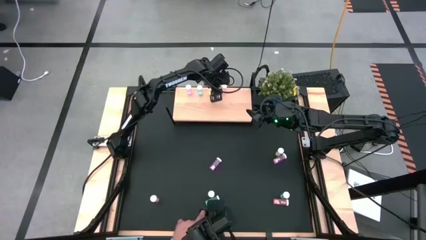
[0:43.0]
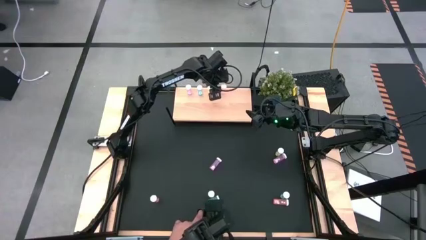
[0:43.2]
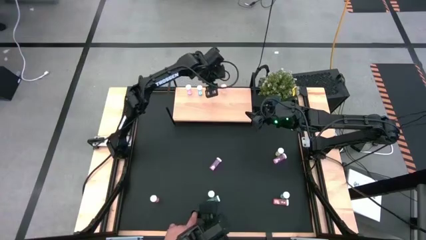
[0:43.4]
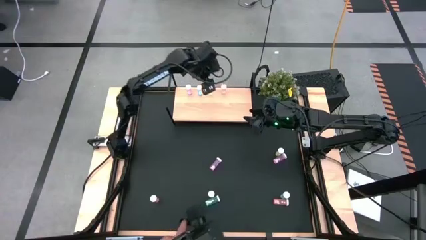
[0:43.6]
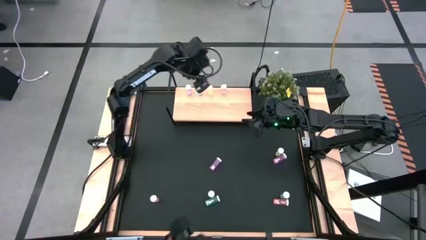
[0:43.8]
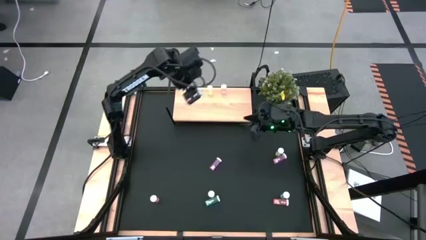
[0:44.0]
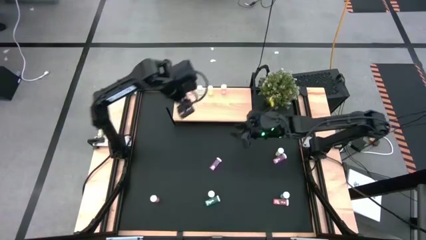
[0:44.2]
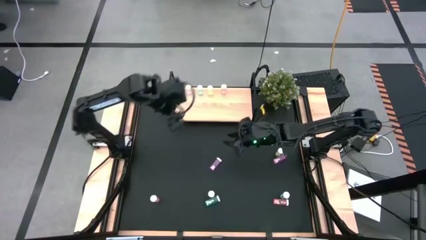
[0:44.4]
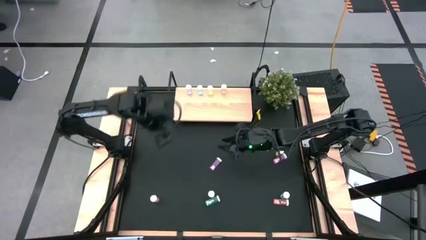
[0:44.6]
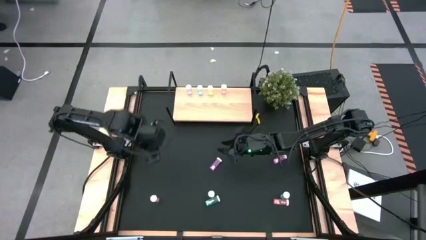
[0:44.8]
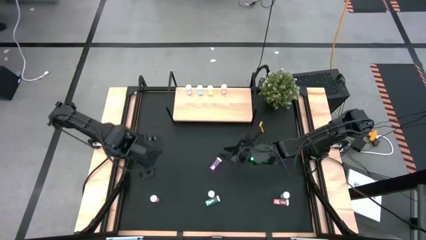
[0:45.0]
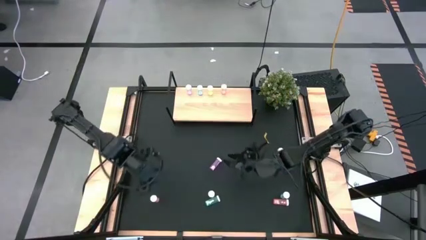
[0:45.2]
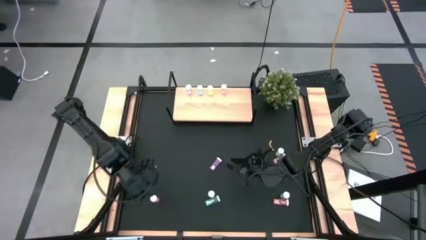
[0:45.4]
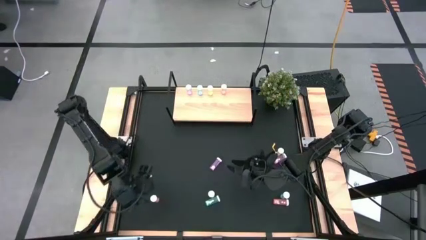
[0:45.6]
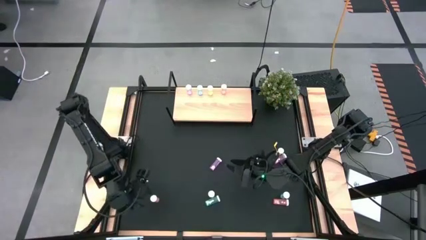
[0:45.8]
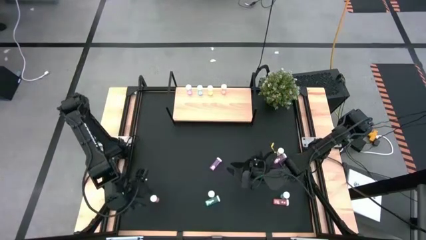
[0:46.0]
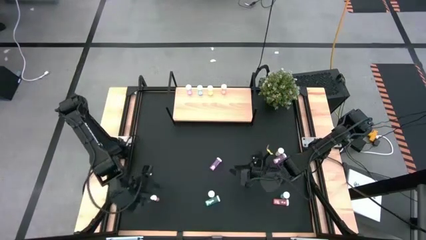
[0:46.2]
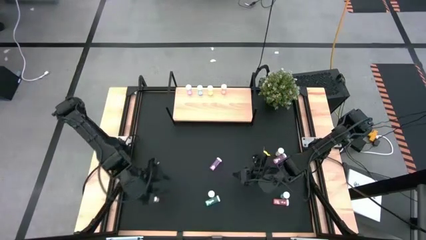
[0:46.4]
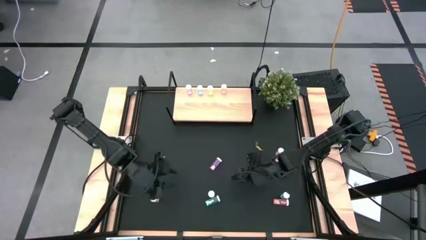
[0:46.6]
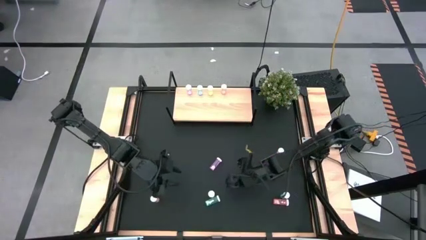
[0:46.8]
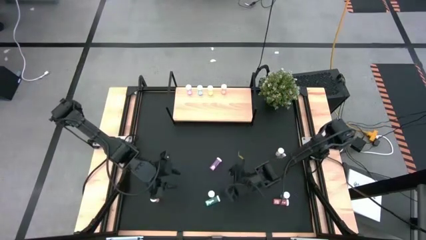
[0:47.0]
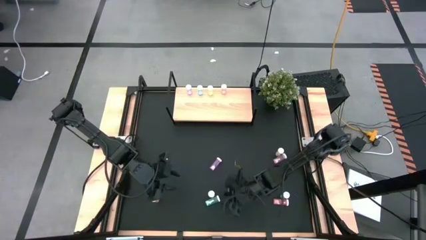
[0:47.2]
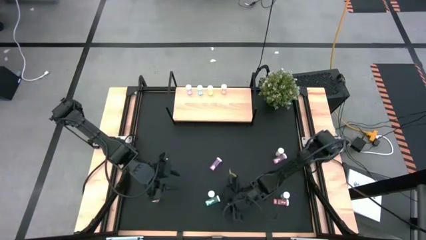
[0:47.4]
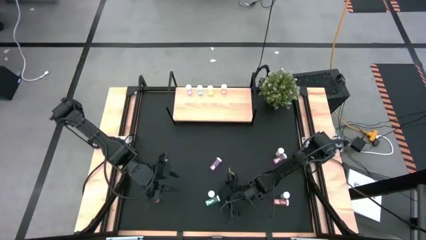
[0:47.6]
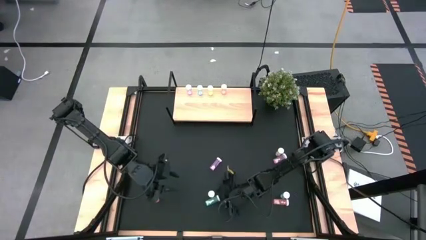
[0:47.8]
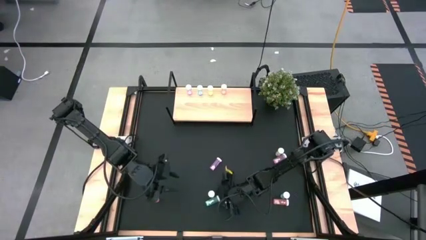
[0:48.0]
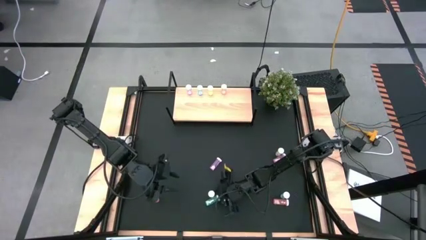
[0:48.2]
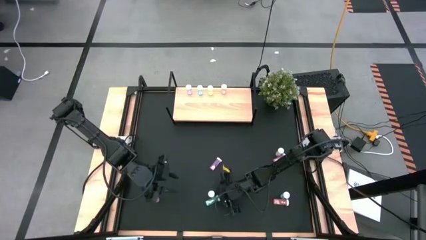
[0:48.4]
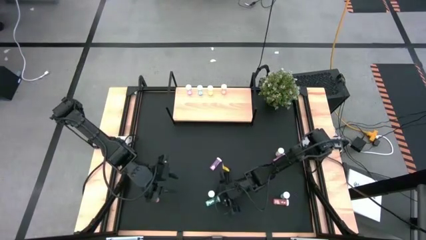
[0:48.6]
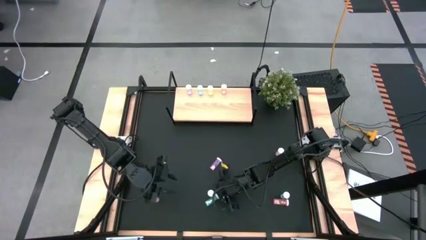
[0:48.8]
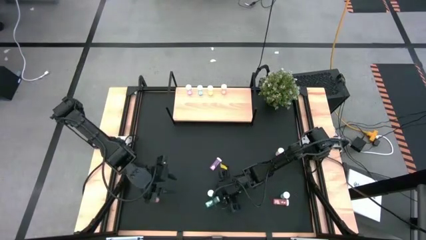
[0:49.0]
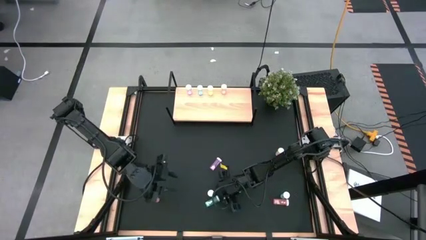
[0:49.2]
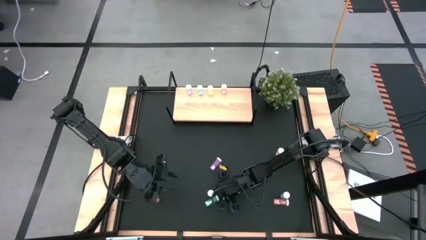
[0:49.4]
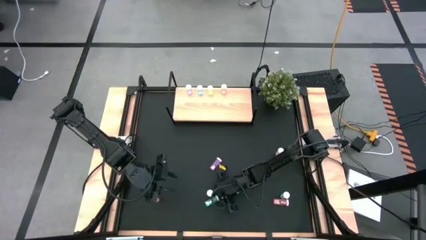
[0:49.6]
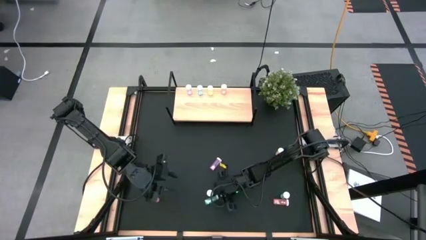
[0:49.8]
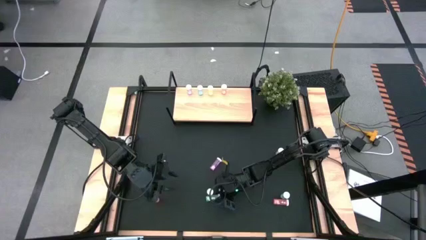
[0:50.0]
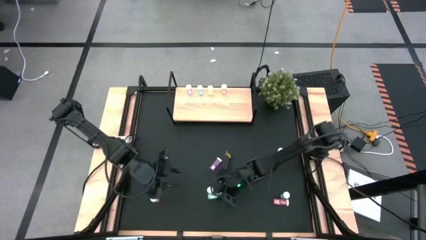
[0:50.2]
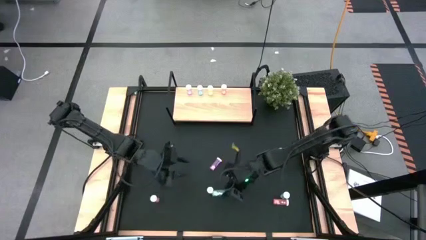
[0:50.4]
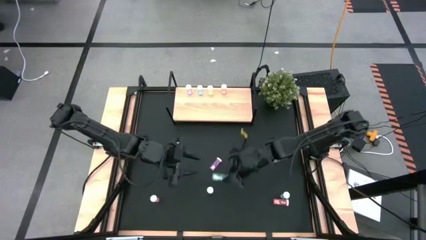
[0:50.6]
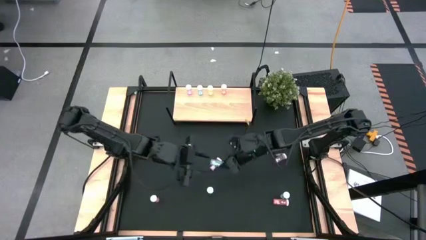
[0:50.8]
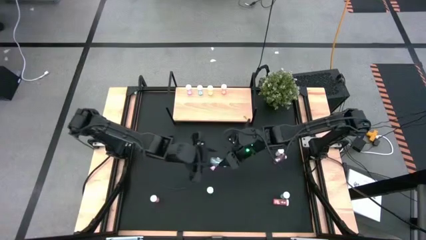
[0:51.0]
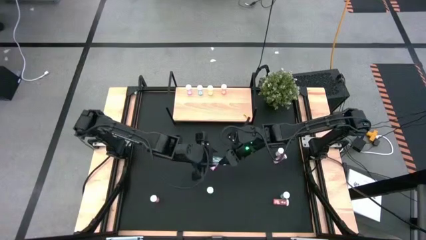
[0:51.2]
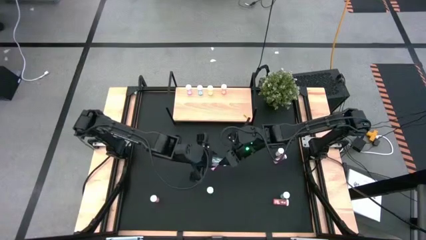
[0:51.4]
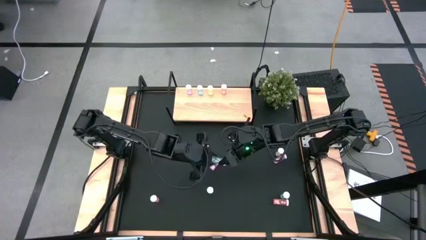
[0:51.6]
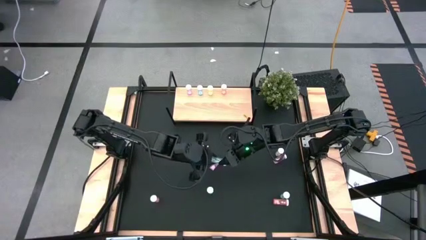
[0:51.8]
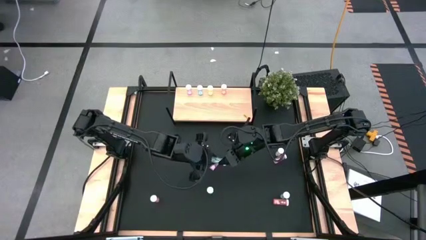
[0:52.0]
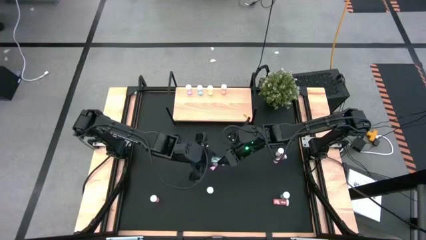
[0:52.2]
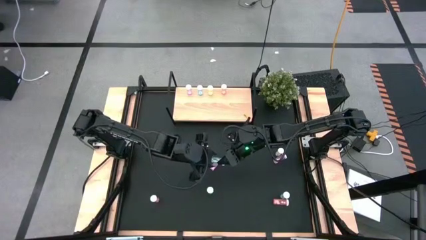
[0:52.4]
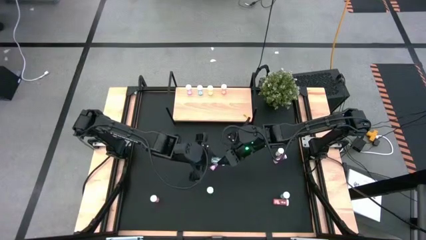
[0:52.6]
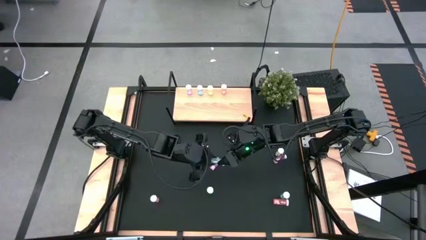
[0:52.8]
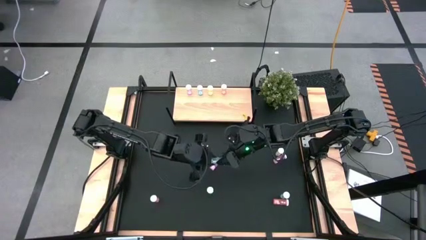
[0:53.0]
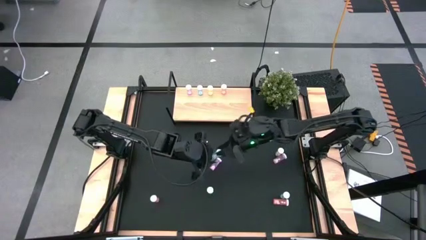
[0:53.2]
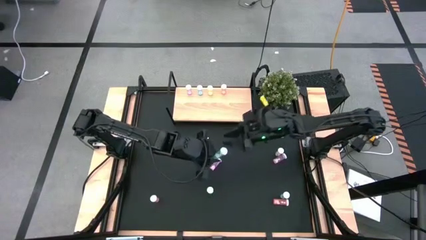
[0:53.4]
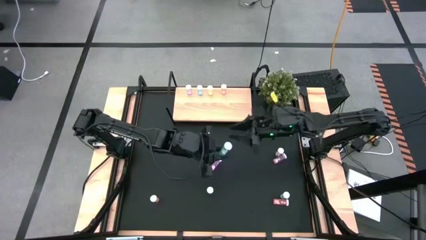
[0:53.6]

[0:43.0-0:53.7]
Task: Pick and place medicine bottles onto shelf by color
Put the left blue medicine bottle on the shelf aligned with the other blue medicine bottle

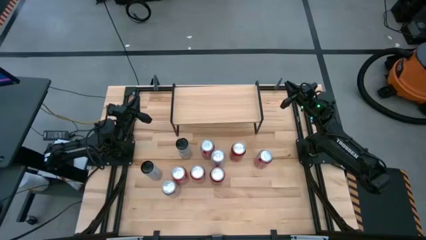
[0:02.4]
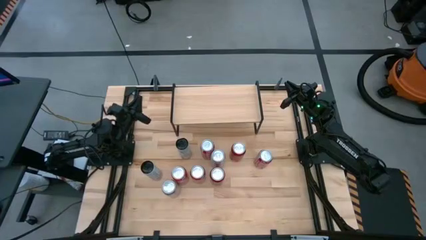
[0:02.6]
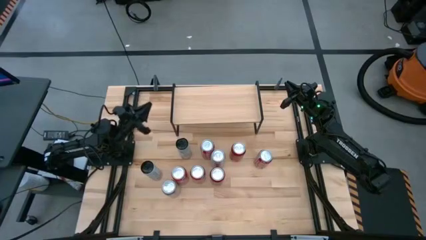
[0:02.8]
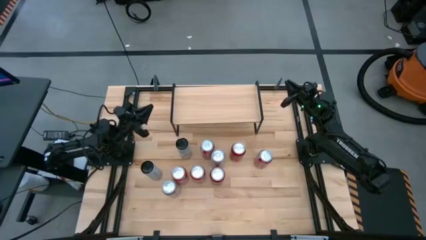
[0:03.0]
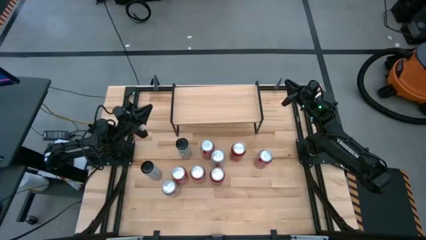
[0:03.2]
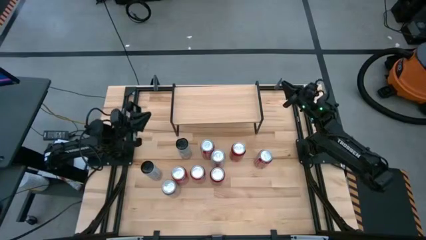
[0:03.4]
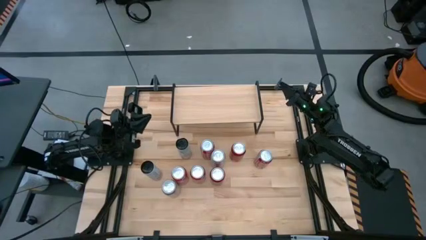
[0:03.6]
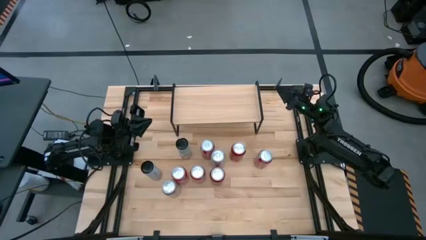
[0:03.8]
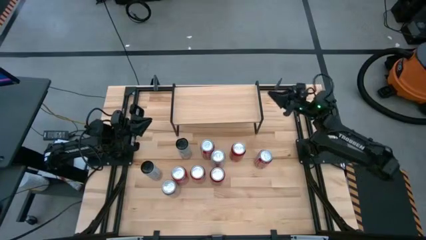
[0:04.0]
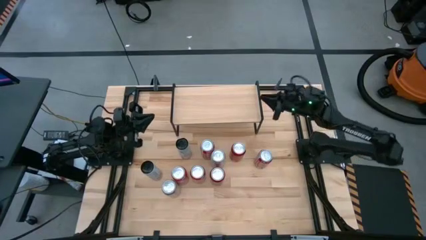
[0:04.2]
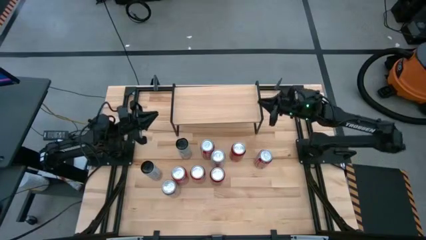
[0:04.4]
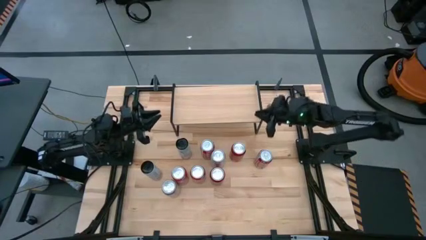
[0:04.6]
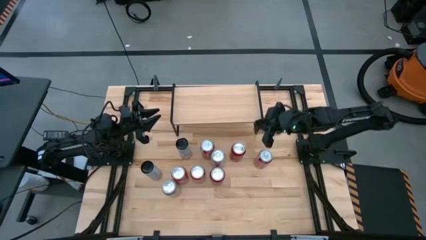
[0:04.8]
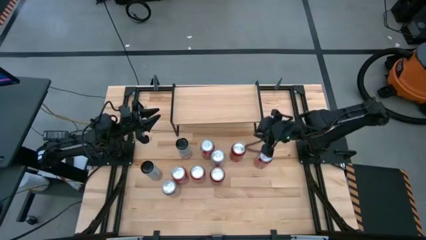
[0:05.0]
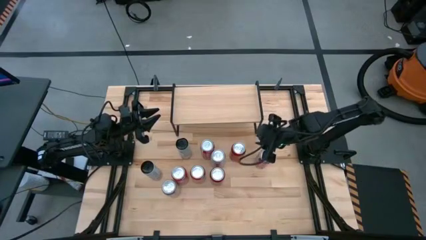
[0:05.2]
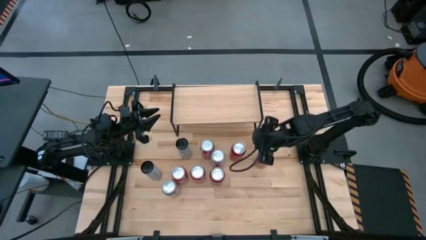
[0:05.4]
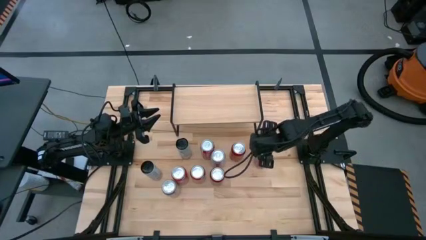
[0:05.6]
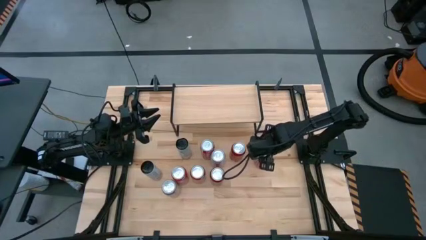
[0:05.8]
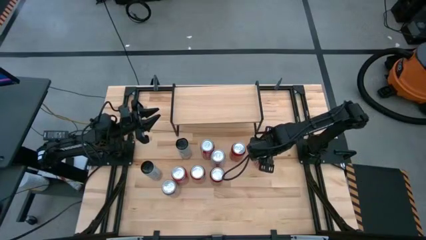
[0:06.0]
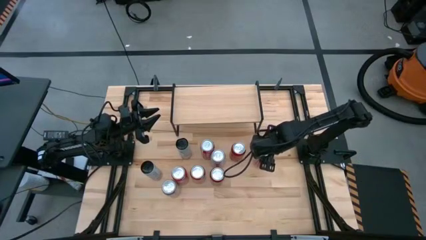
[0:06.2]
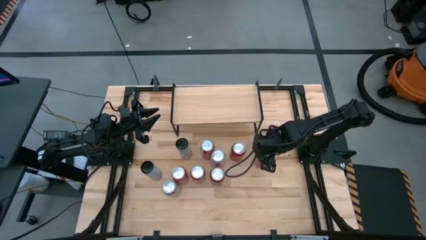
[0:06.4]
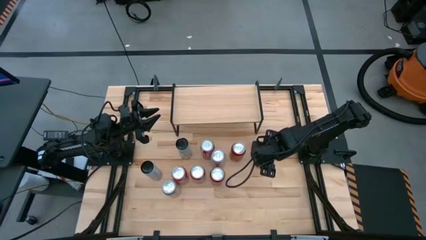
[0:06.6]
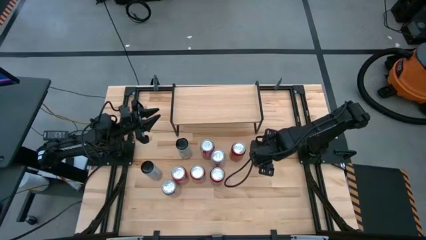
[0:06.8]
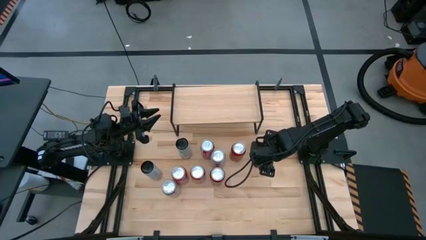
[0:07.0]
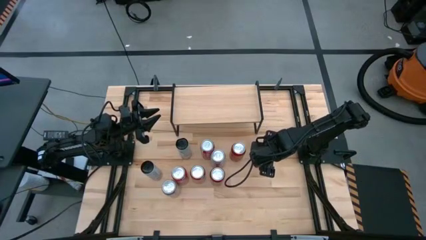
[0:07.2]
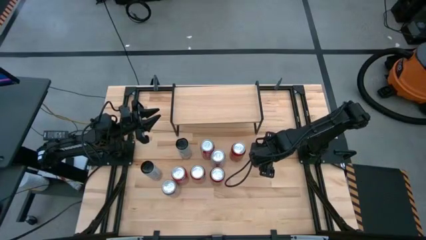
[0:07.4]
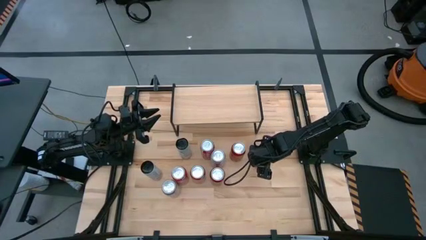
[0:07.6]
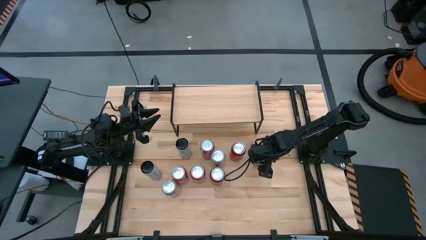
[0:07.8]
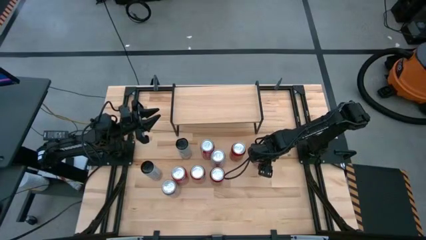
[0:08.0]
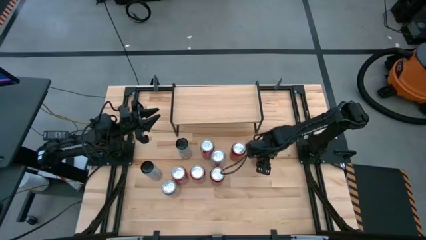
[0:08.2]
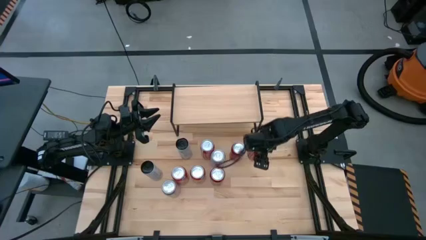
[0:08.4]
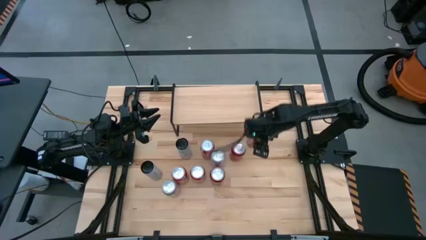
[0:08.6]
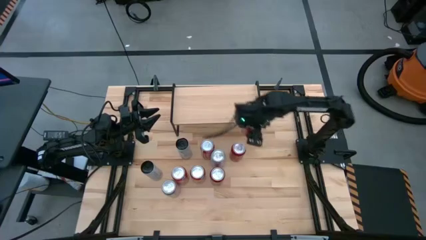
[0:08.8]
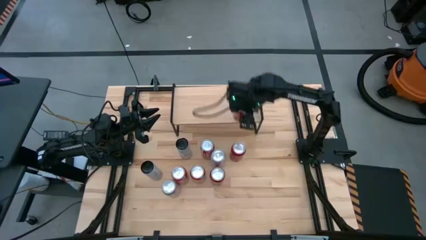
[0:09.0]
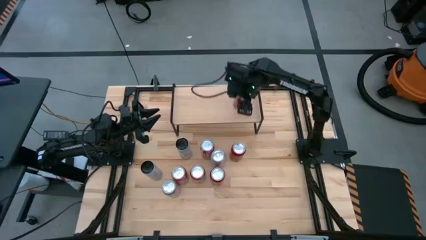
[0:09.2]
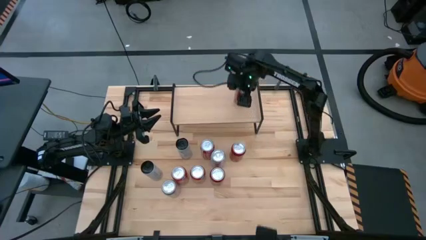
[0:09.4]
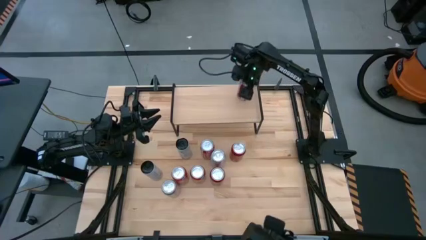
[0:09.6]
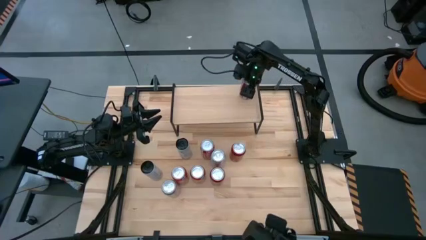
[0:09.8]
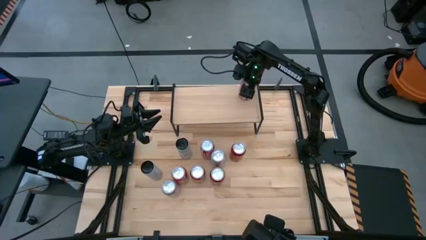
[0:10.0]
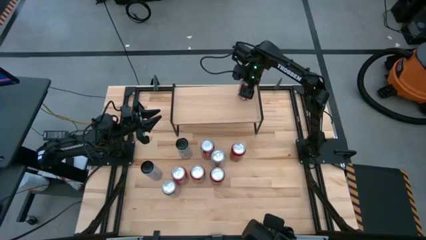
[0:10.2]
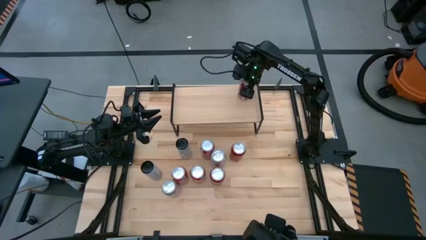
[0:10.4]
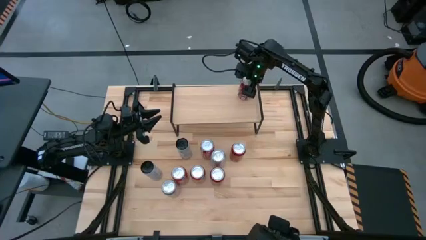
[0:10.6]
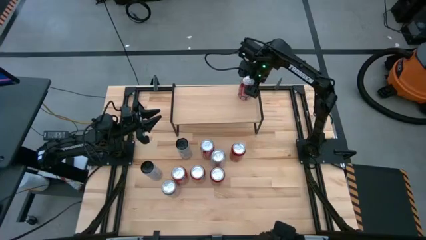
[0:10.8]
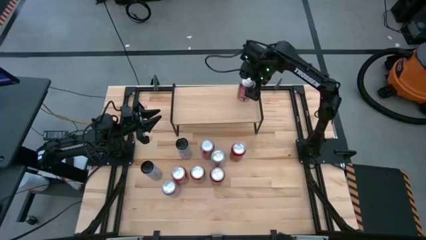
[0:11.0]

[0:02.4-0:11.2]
Task: Place canned beverage on shelf
Put the red soda can on the shelf
